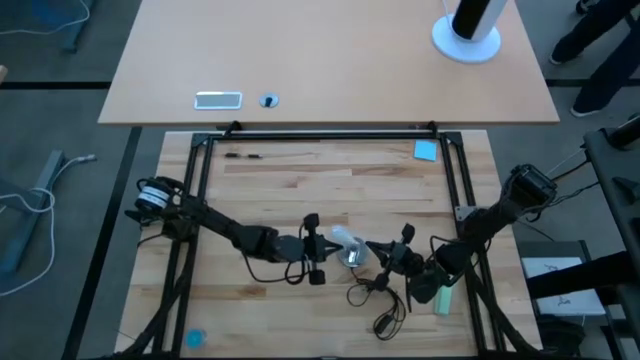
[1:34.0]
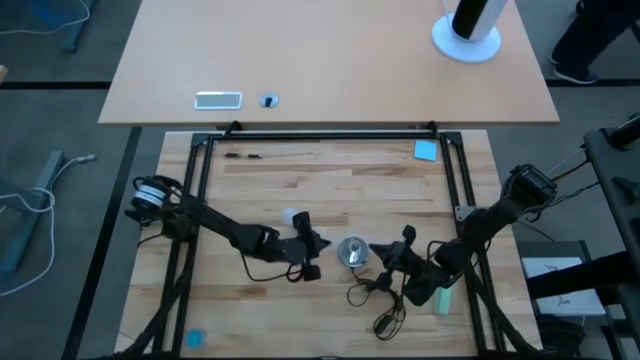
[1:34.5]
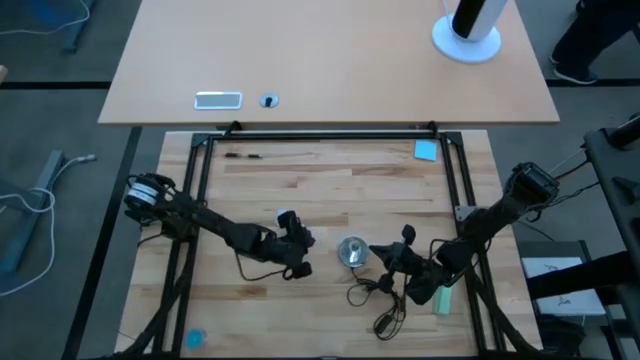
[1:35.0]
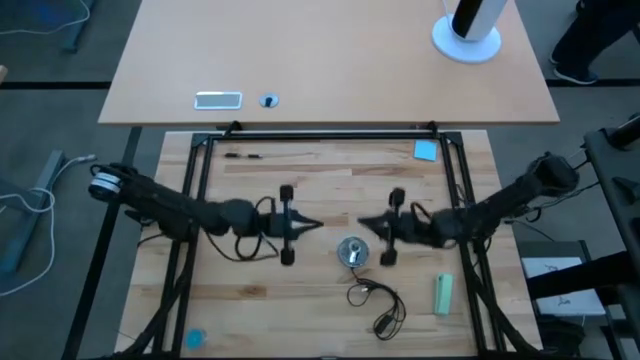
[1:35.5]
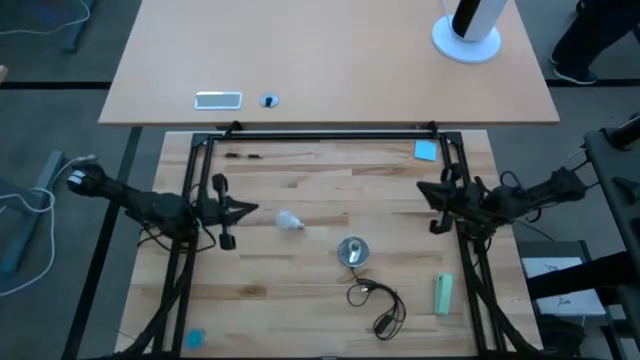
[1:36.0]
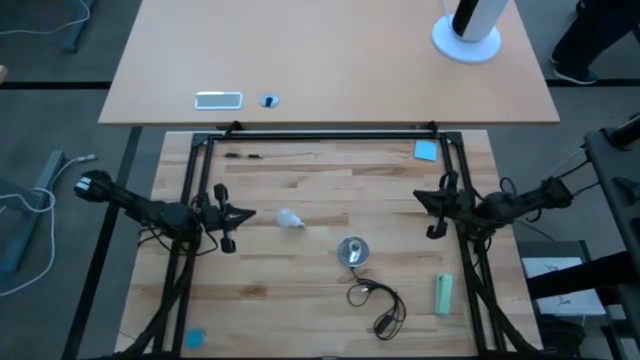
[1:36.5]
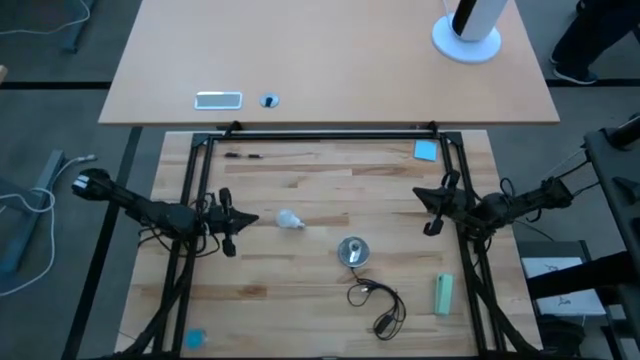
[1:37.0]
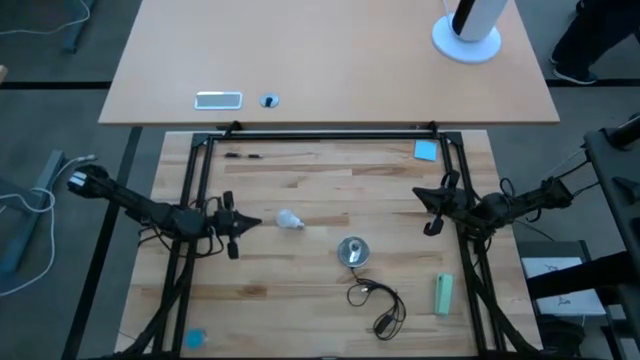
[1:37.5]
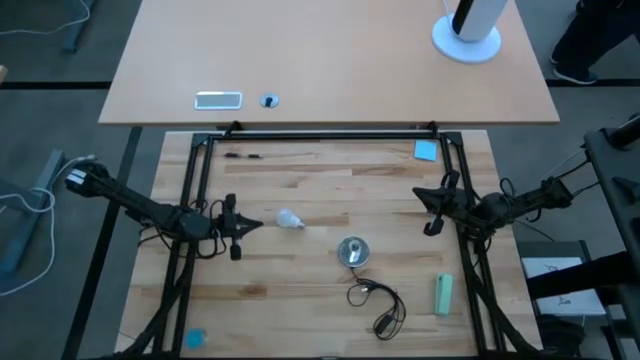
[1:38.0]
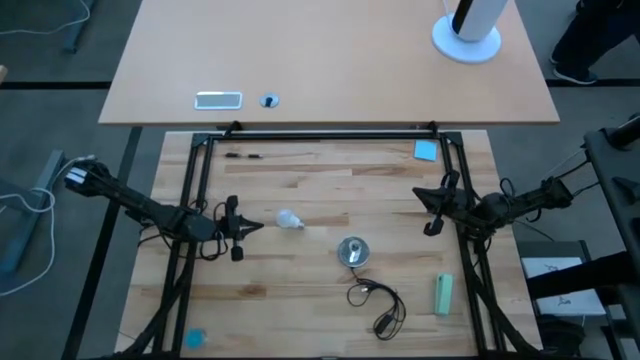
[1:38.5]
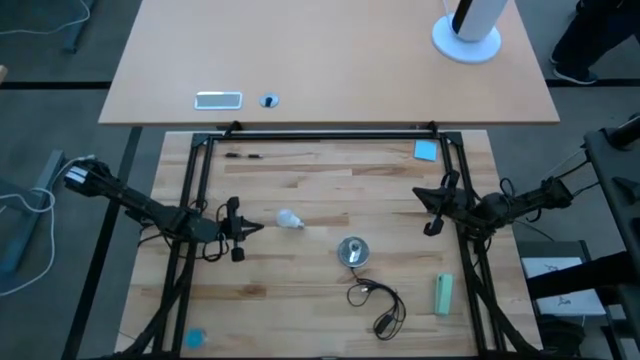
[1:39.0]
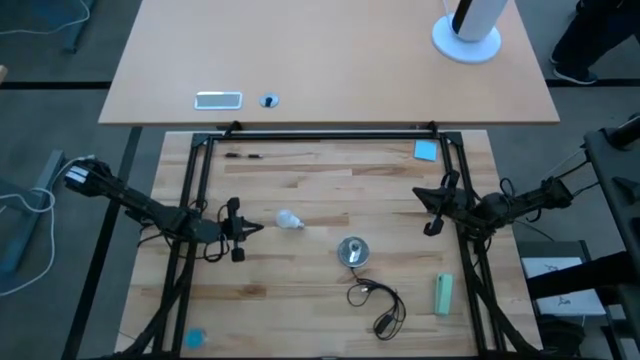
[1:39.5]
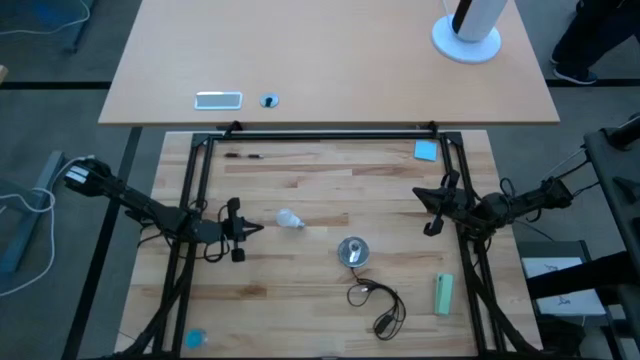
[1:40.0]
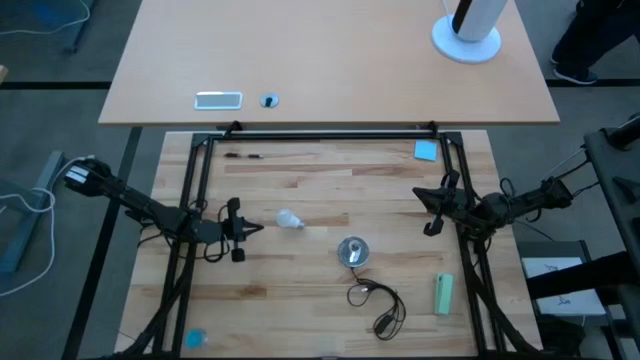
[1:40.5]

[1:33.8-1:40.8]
Task: Screw lightbulb
Return to Home Position

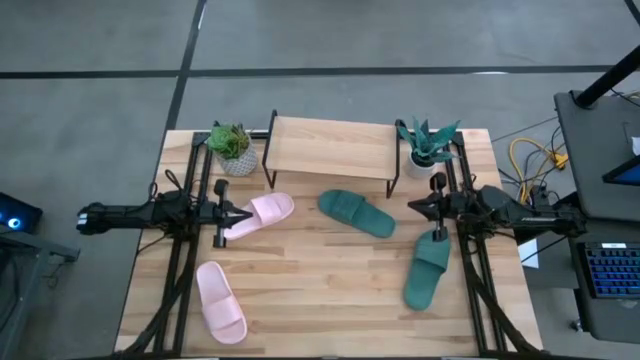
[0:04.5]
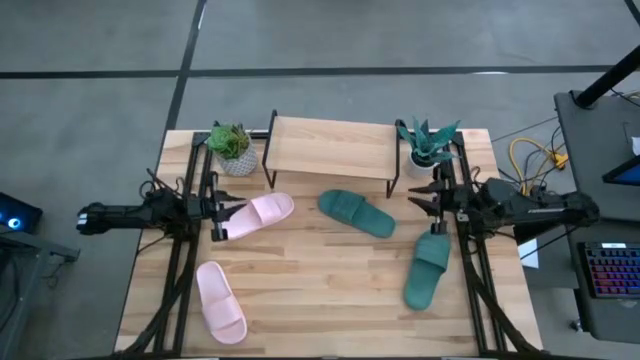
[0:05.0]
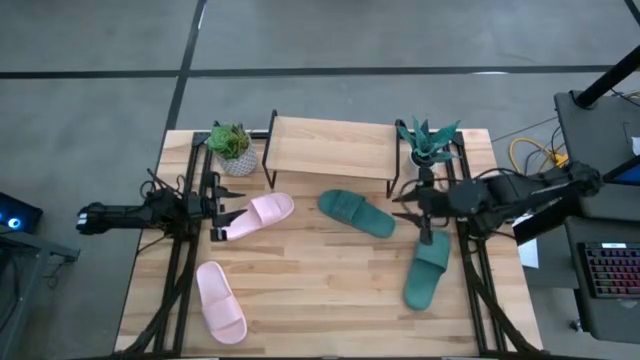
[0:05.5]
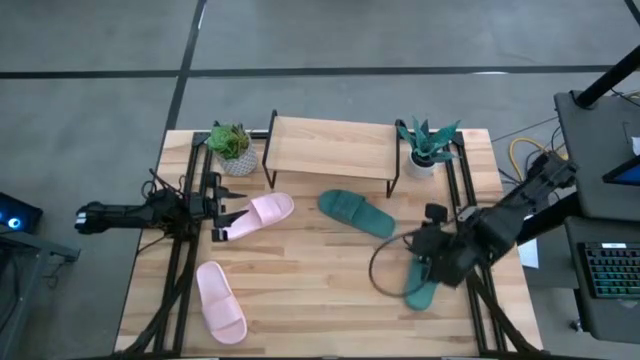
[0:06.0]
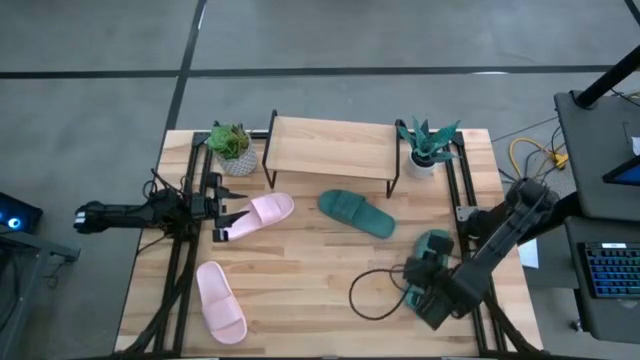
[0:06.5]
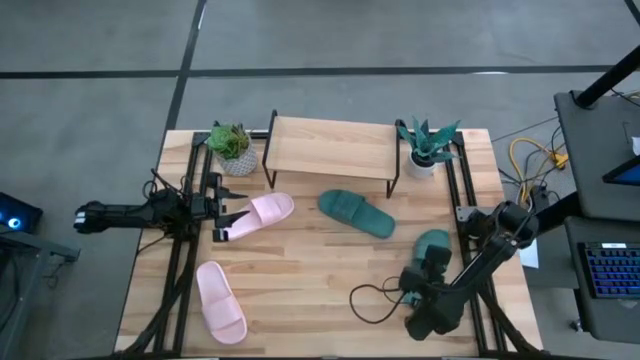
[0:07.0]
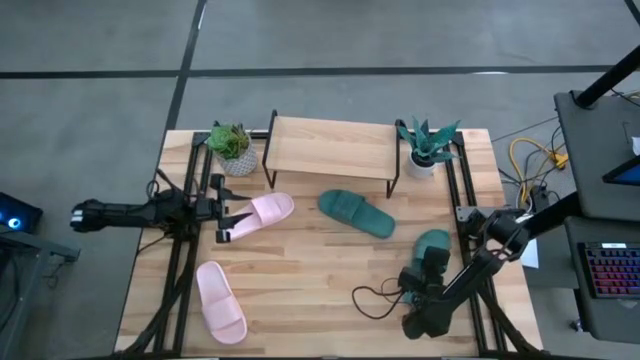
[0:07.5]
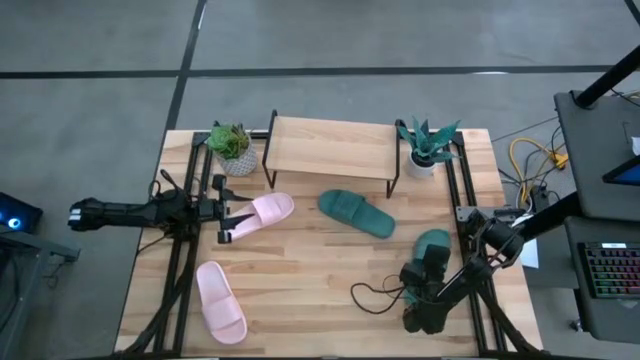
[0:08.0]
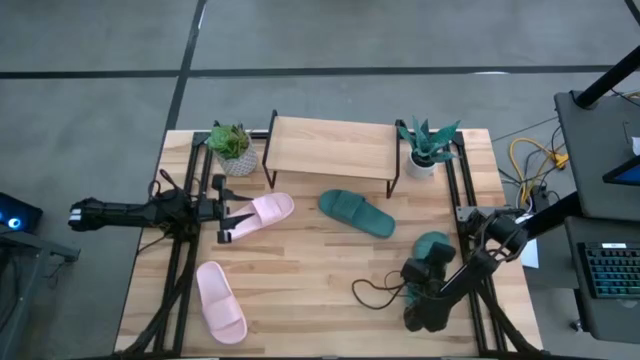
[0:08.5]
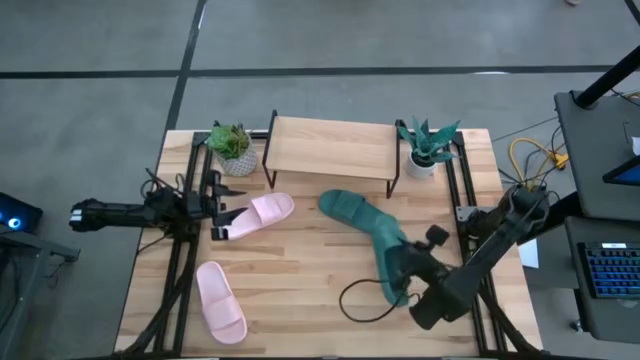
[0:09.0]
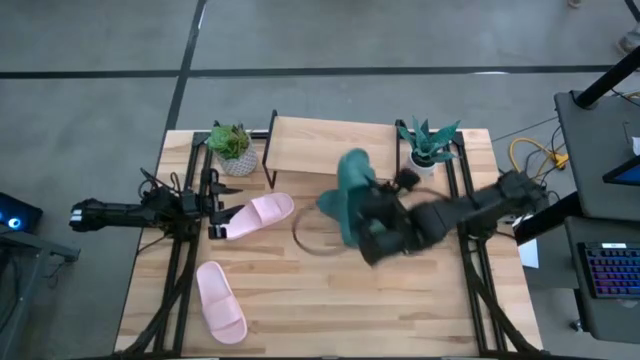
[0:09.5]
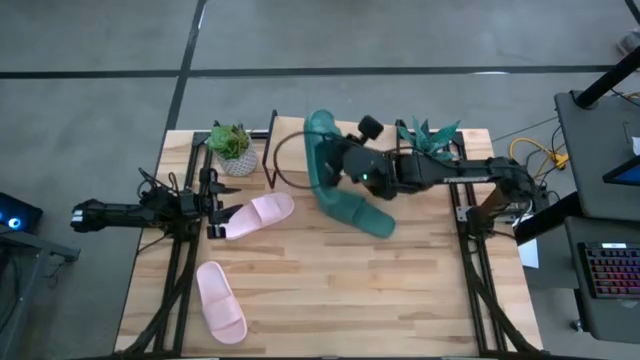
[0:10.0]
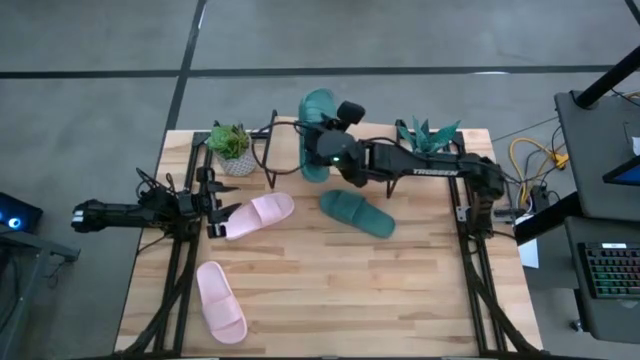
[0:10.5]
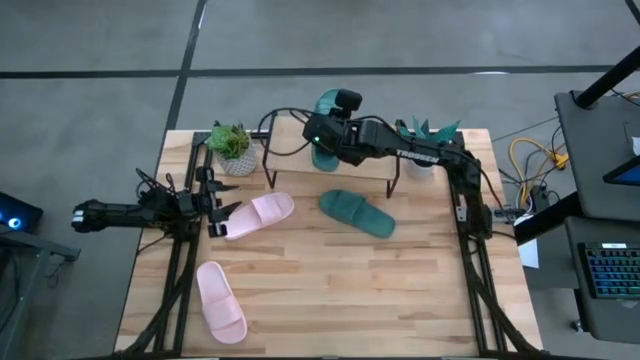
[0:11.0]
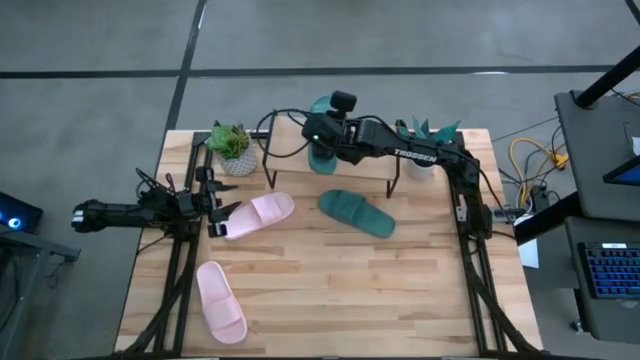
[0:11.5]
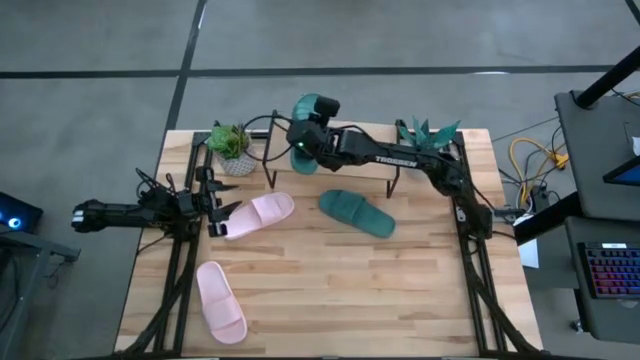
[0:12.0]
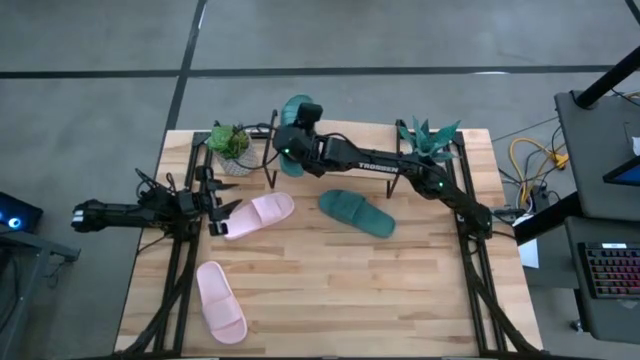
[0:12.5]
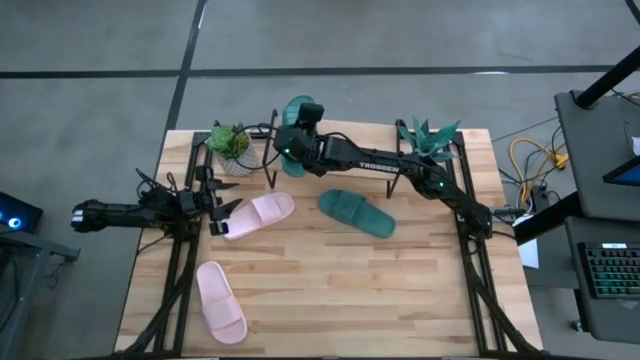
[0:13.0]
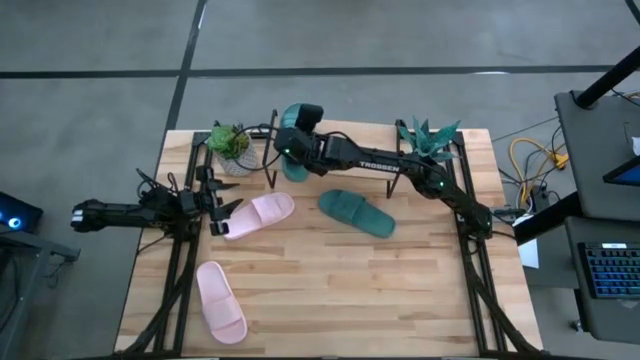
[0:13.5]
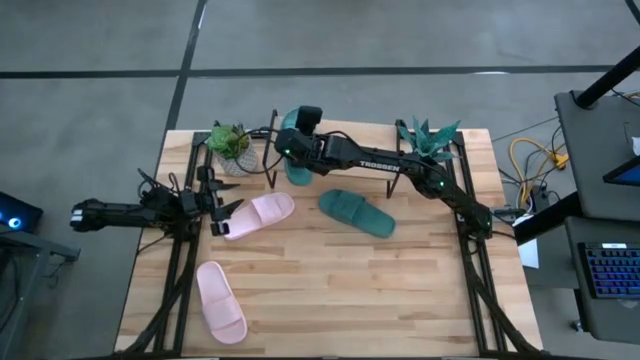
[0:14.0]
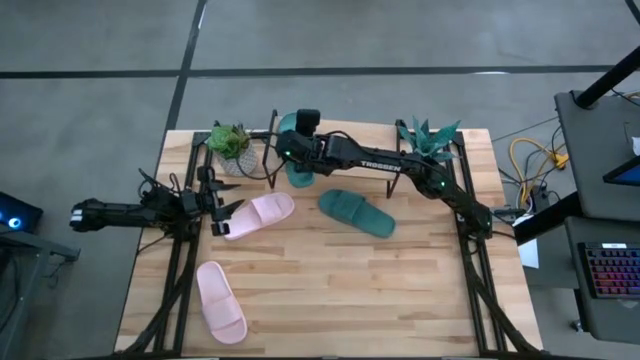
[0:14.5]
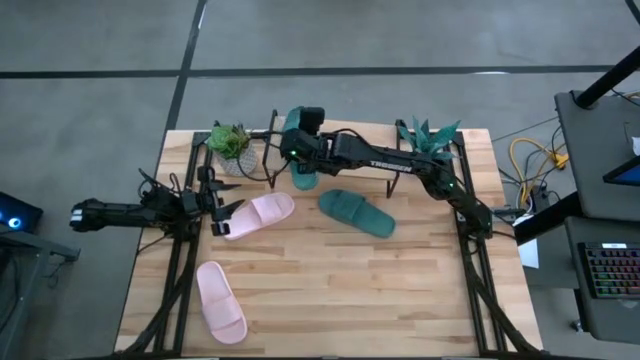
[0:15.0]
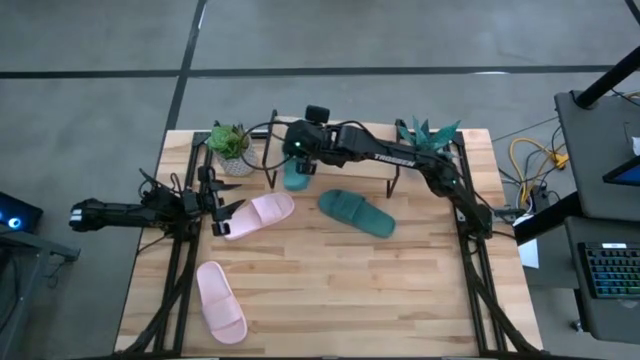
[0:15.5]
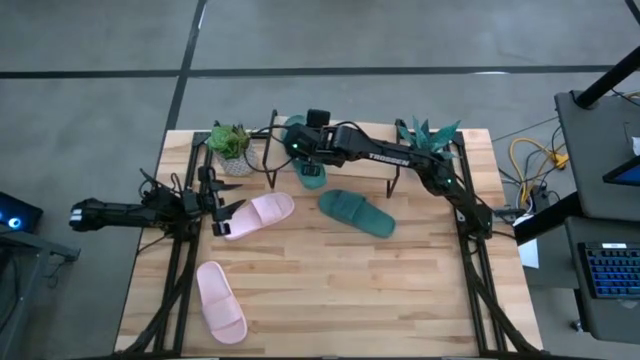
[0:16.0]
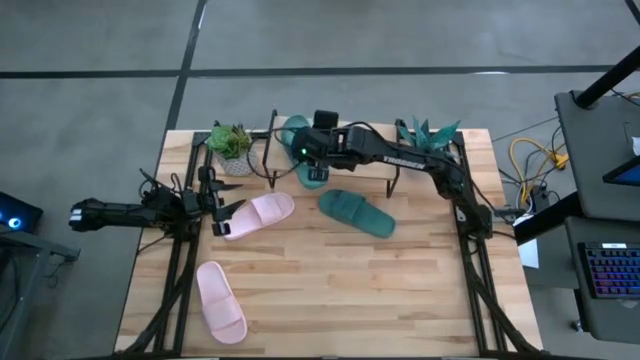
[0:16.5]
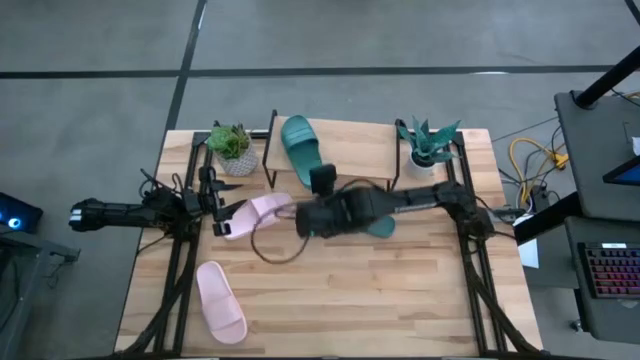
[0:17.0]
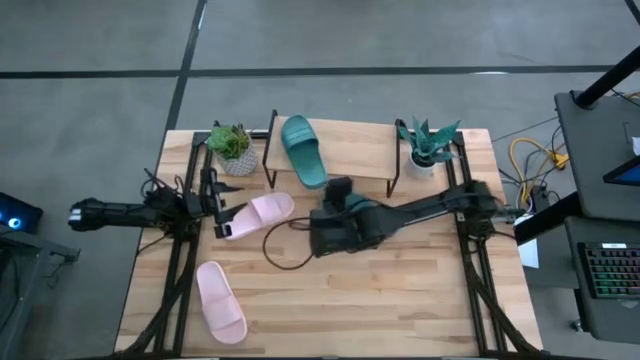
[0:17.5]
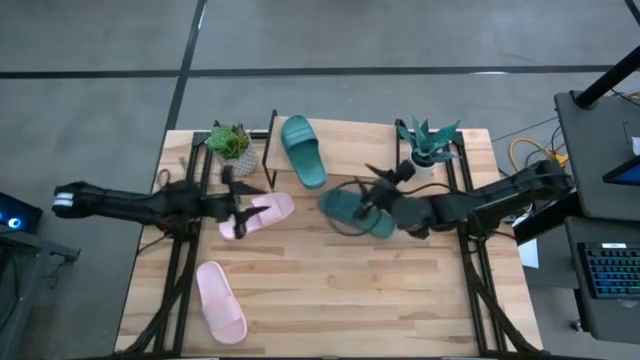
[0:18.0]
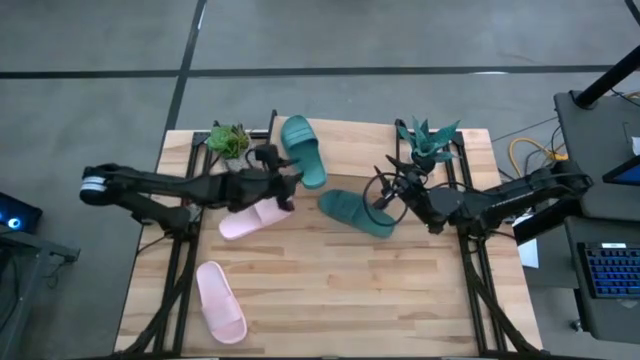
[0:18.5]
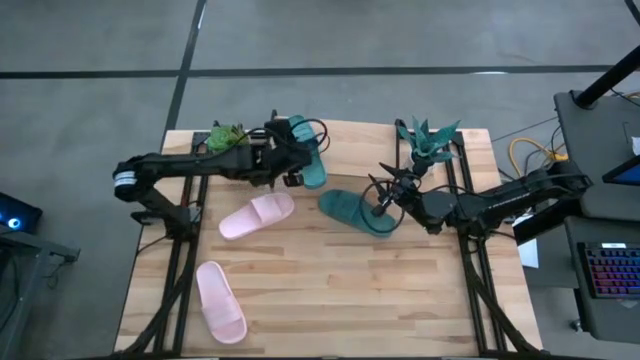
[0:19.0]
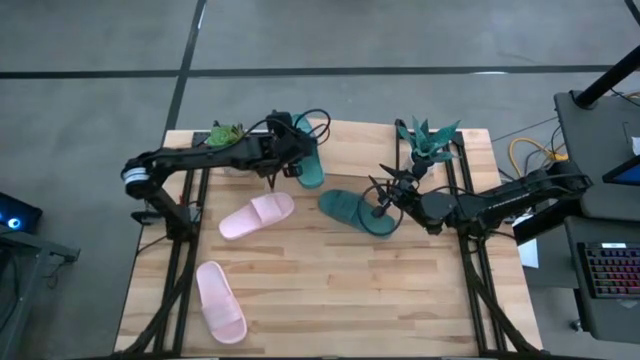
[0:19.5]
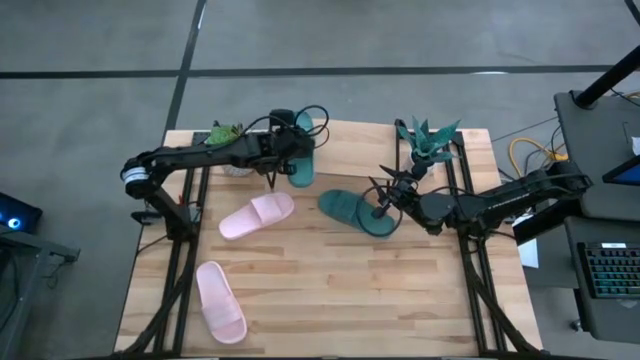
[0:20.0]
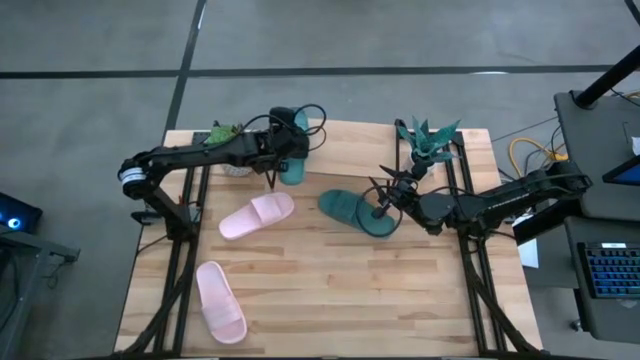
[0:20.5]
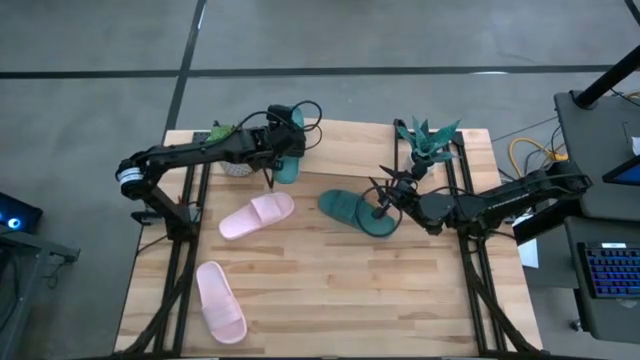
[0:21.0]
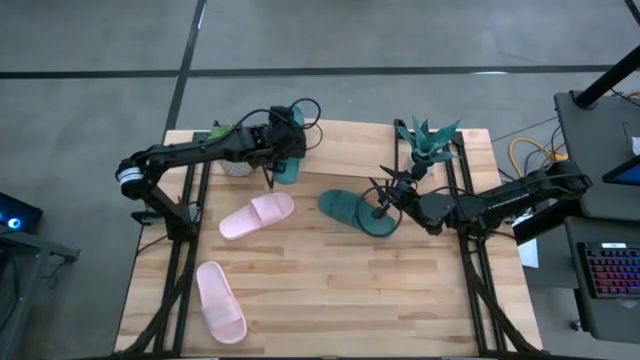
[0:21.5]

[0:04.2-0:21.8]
Task: Pick and place slides into the shelf
Put the bottom green slide on the shelf
